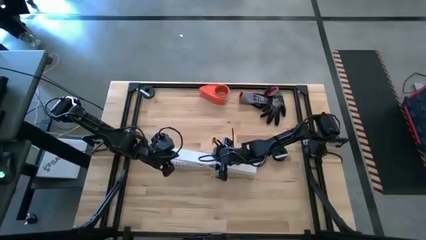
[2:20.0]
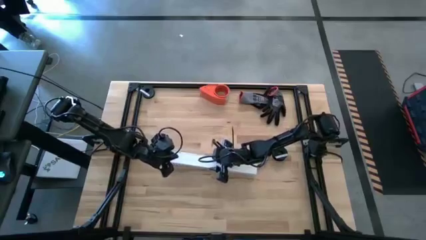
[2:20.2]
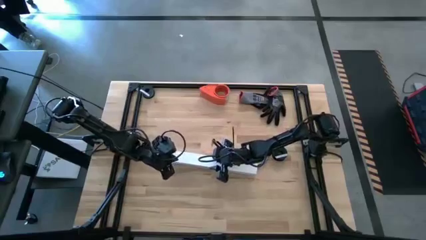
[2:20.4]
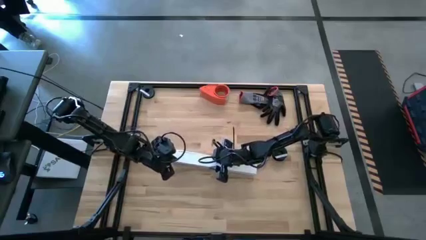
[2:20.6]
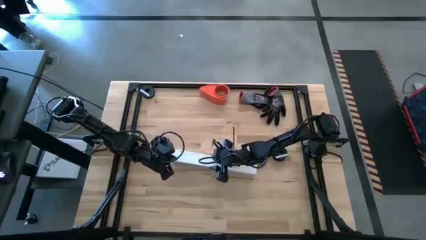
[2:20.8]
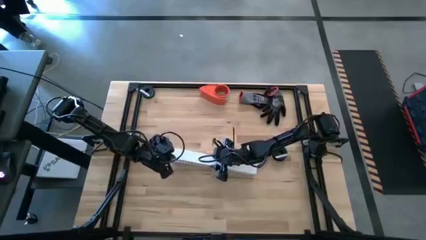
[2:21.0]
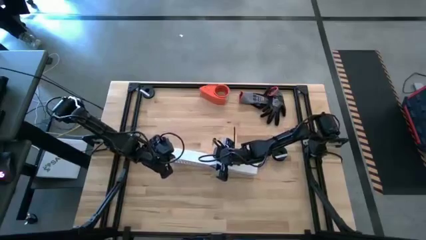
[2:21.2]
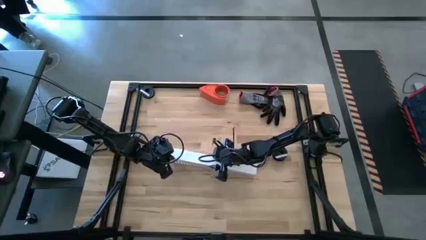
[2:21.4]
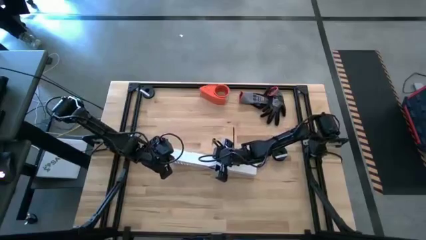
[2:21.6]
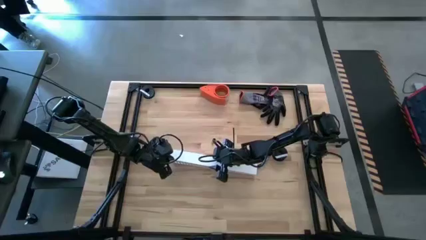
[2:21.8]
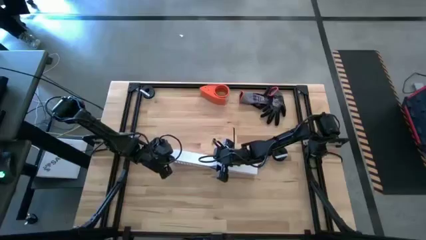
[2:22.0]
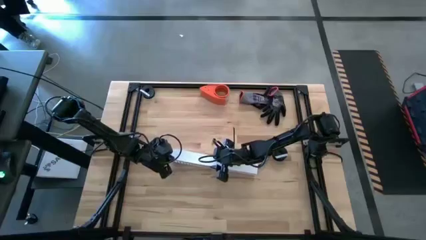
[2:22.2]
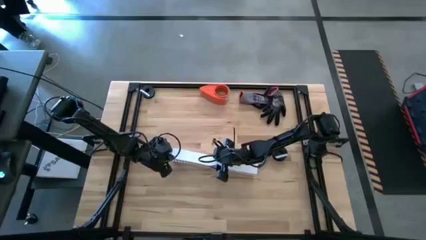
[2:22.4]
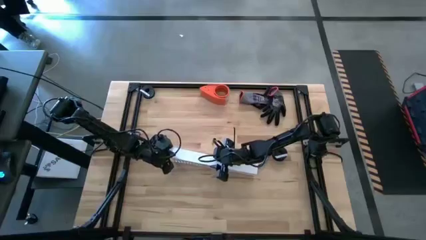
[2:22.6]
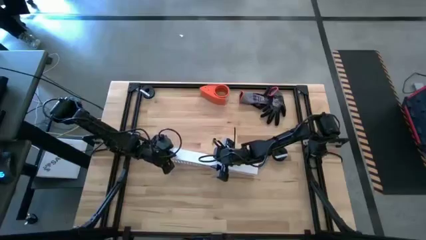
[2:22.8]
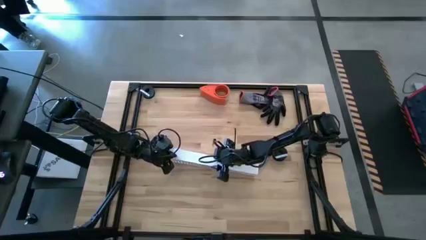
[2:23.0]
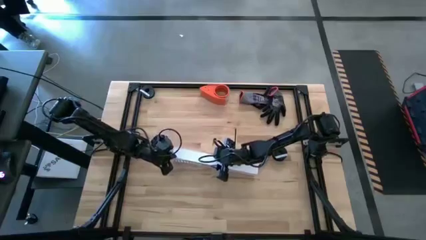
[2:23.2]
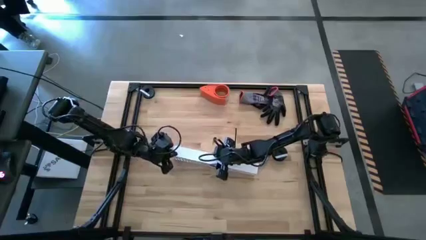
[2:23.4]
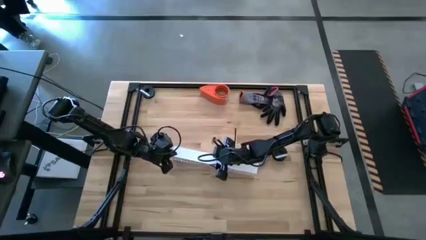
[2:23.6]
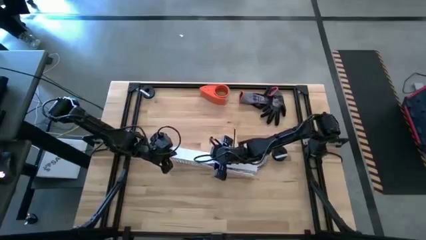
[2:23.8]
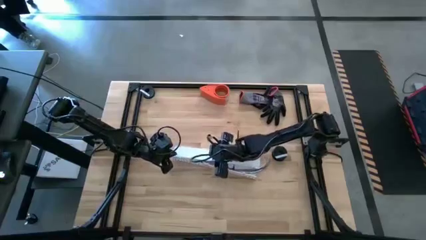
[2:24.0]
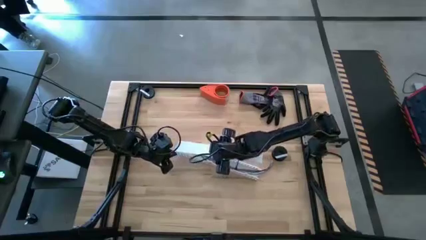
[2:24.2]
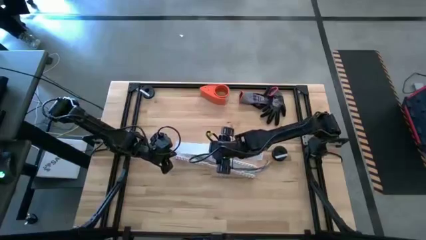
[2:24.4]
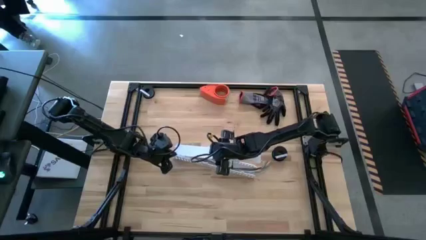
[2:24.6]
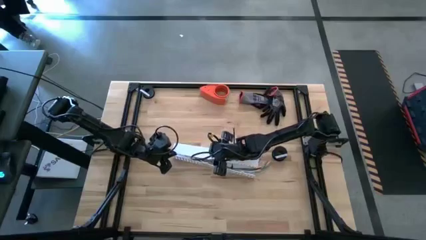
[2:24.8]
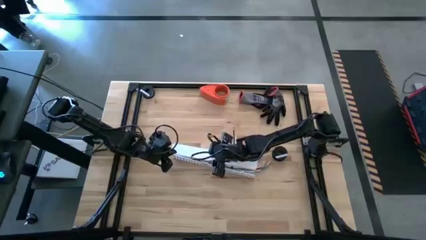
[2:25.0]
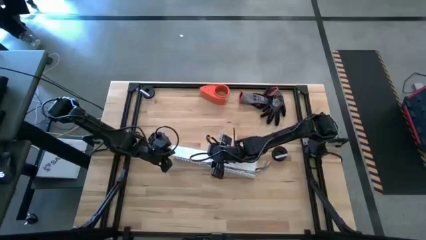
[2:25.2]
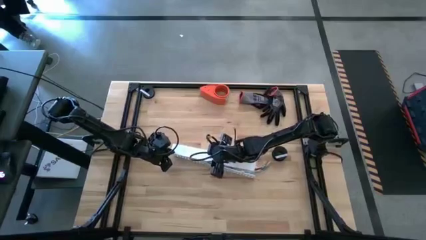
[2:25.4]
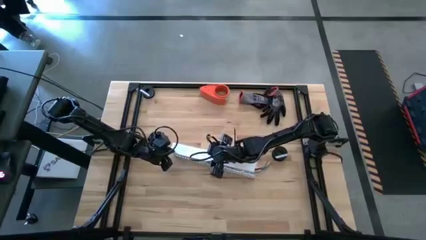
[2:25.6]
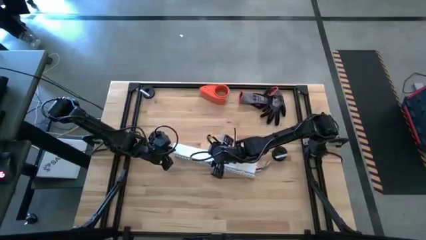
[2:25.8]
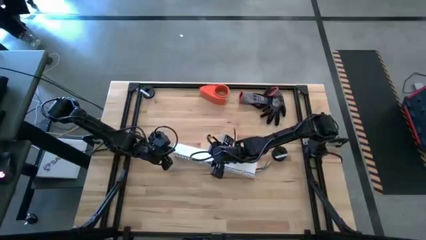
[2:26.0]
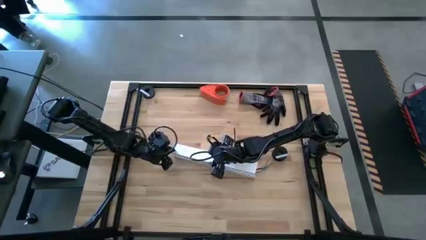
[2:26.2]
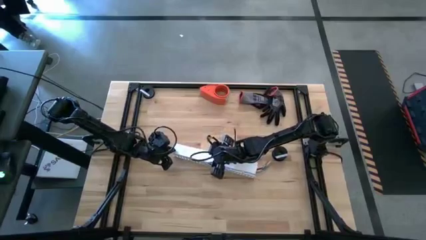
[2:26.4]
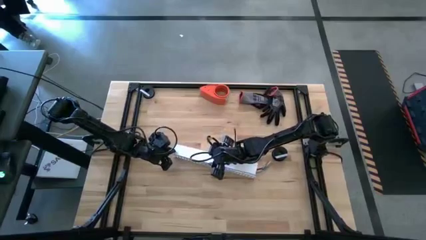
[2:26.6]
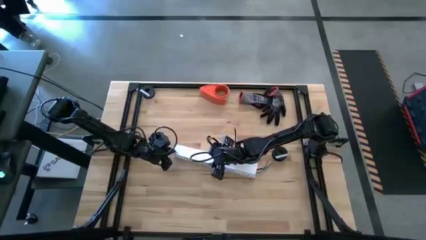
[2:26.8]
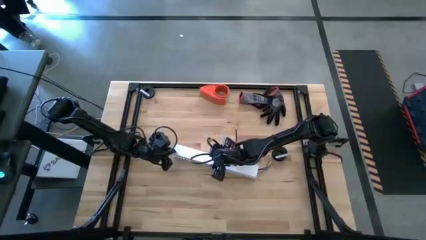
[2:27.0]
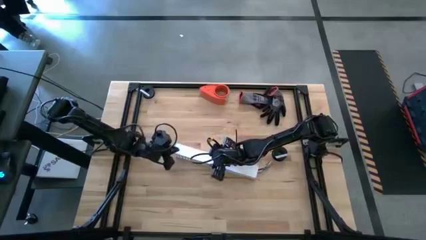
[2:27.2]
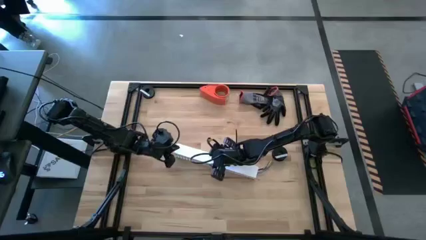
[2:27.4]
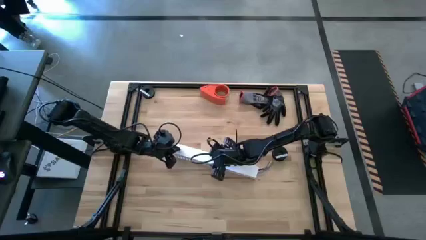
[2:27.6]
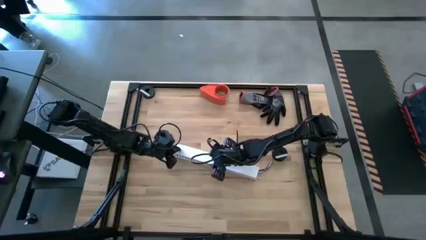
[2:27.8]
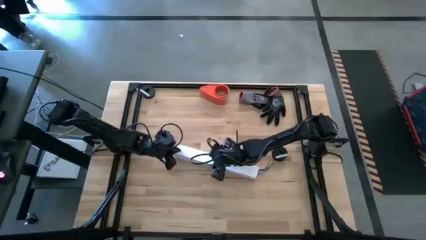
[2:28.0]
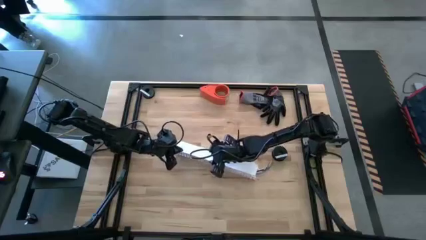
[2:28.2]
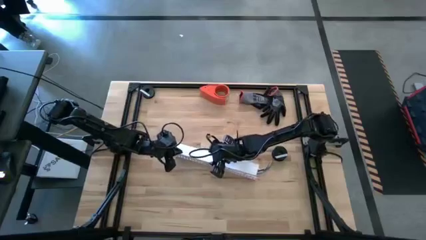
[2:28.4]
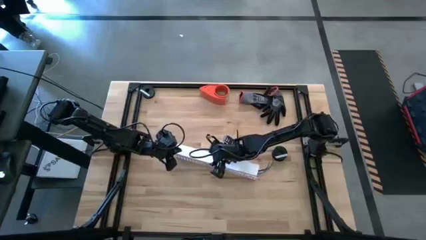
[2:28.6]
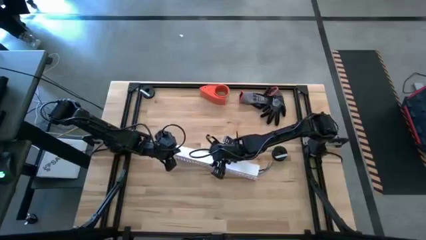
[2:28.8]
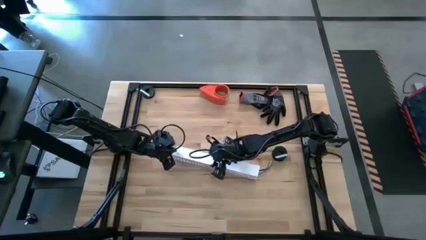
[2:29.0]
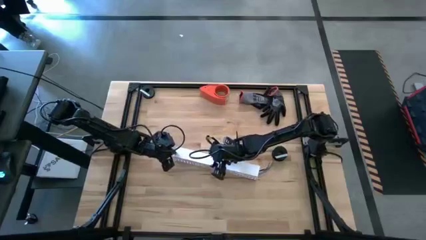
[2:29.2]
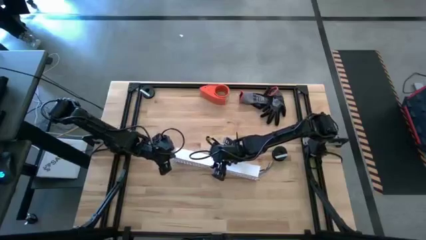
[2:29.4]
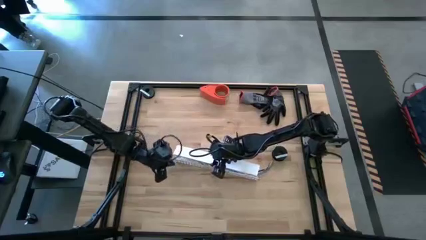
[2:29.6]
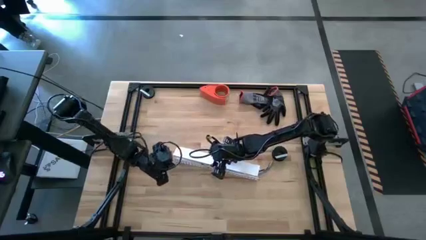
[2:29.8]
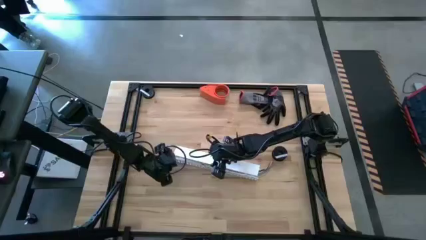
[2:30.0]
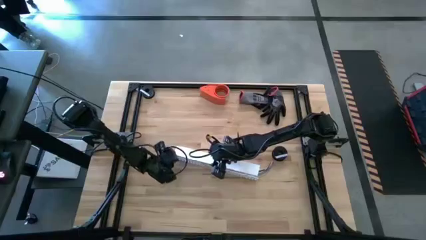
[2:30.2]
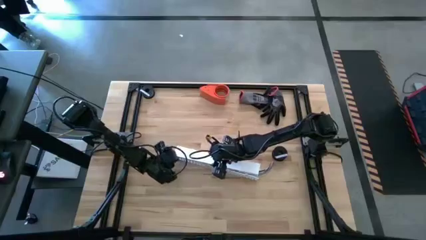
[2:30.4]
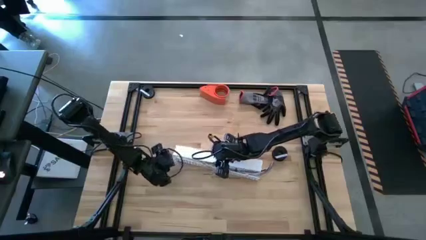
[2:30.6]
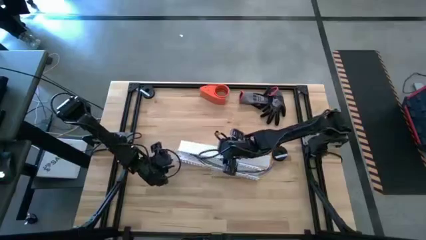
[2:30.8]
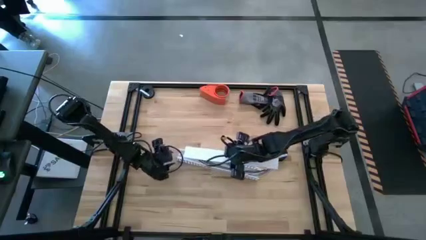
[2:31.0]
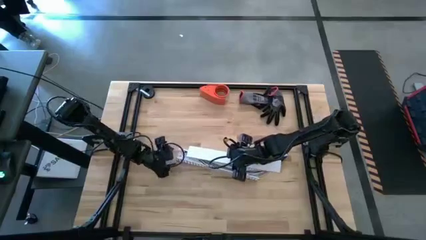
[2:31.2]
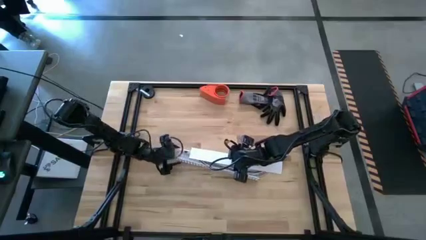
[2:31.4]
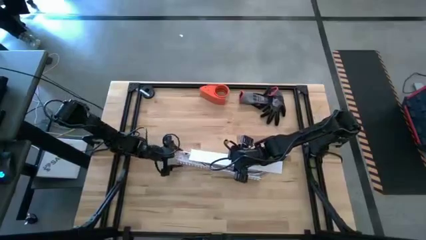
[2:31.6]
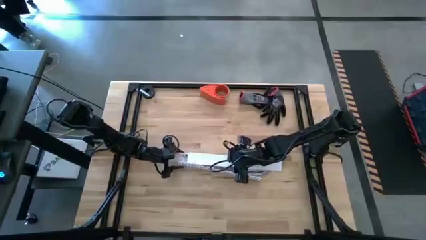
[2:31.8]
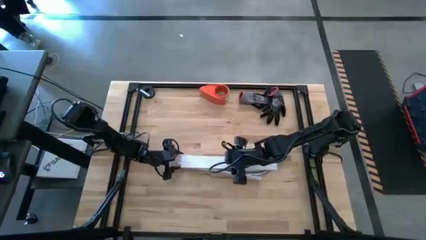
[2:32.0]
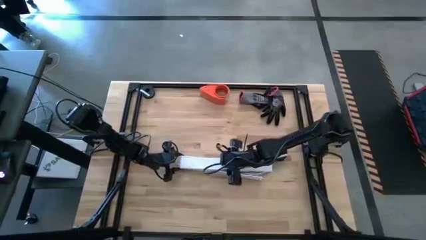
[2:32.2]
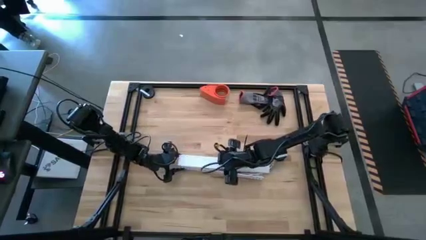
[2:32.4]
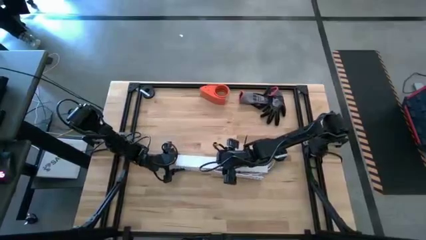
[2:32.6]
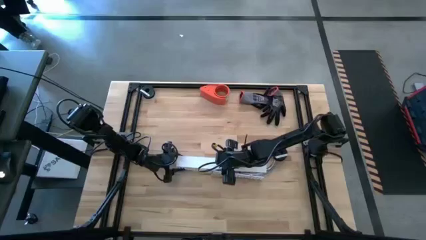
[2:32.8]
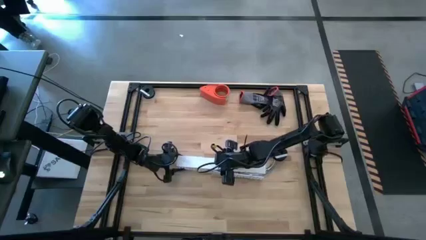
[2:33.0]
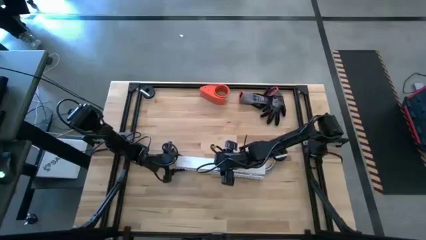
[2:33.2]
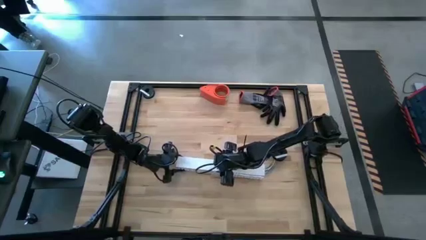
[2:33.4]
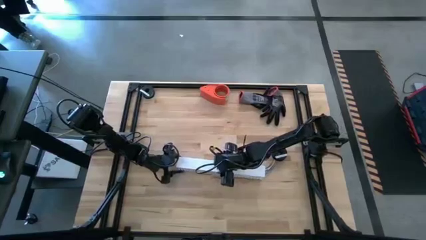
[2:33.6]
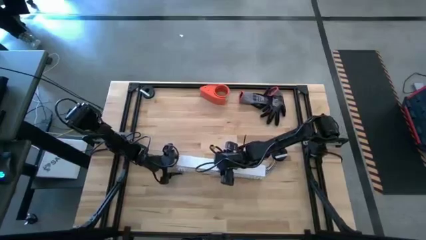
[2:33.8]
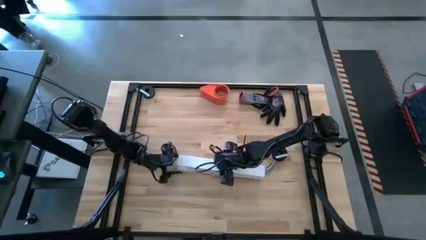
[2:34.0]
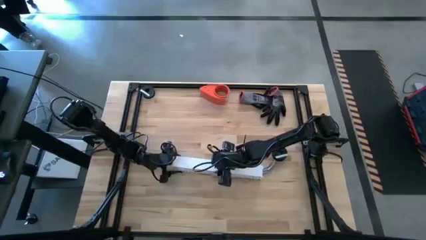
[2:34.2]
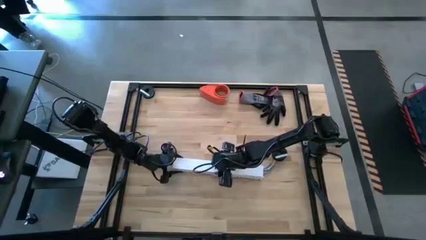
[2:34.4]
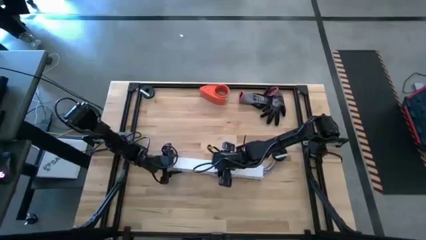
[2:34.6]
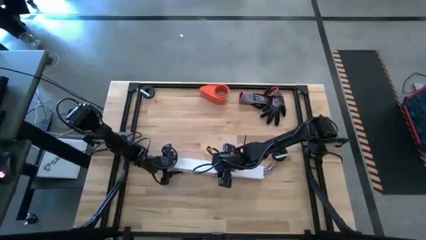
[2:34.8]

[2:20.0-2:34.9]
Task: Ziptie cables
Close the white cable duct
